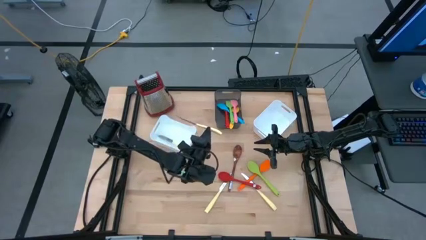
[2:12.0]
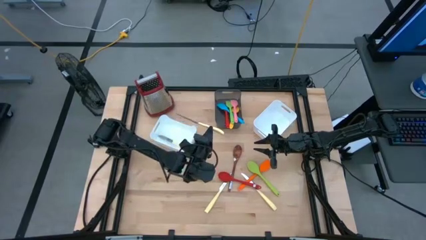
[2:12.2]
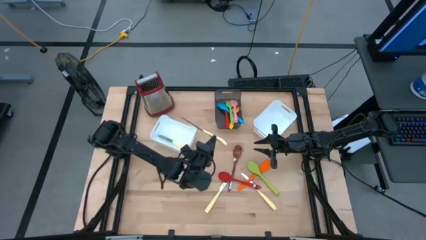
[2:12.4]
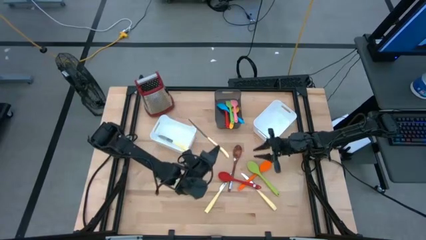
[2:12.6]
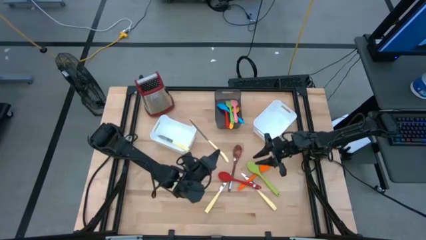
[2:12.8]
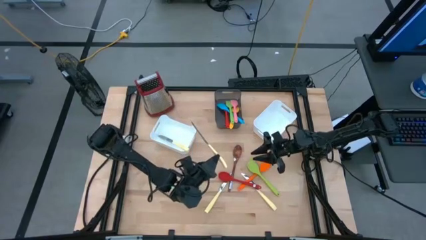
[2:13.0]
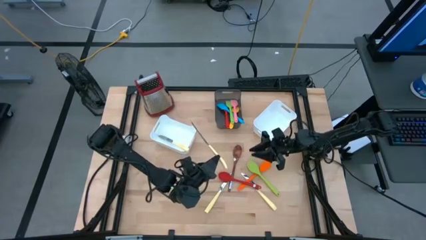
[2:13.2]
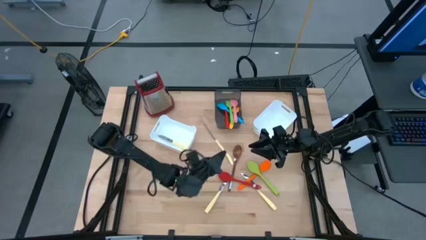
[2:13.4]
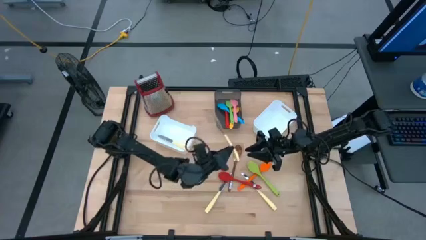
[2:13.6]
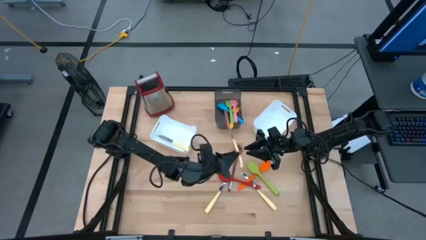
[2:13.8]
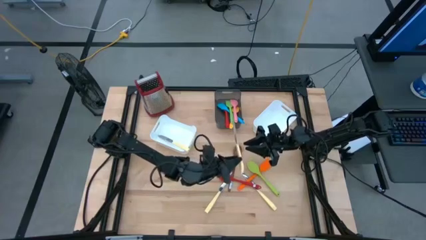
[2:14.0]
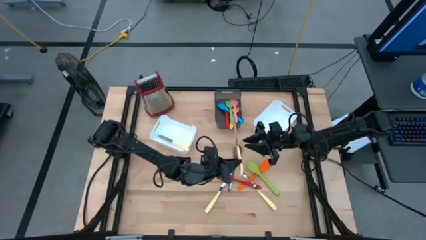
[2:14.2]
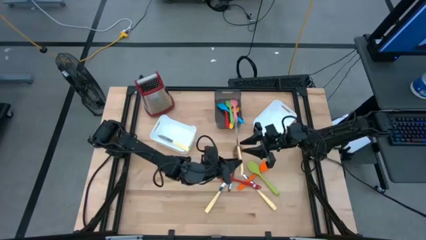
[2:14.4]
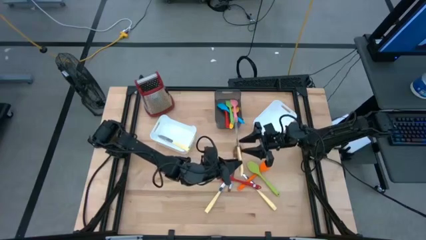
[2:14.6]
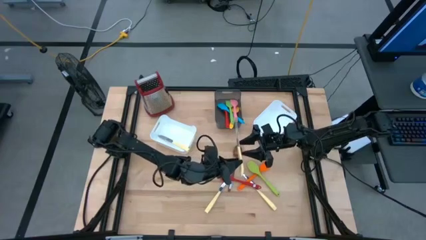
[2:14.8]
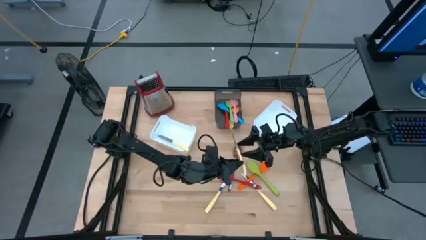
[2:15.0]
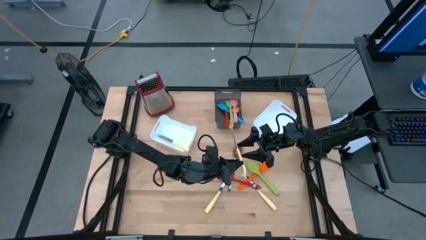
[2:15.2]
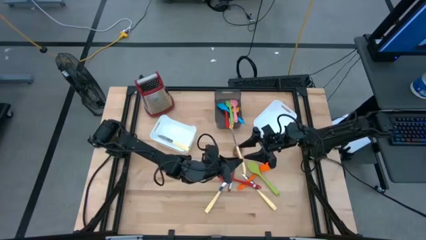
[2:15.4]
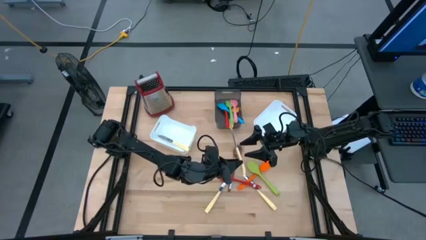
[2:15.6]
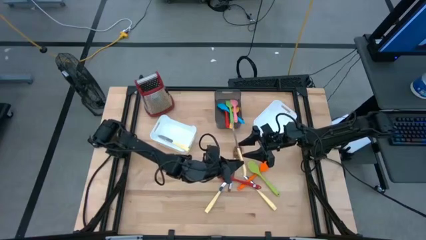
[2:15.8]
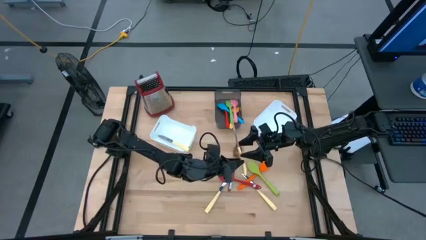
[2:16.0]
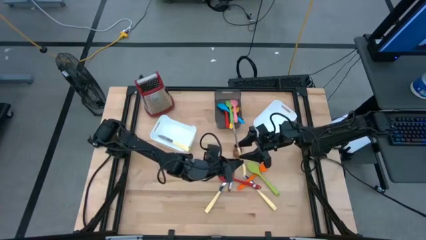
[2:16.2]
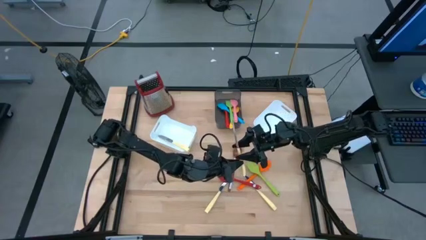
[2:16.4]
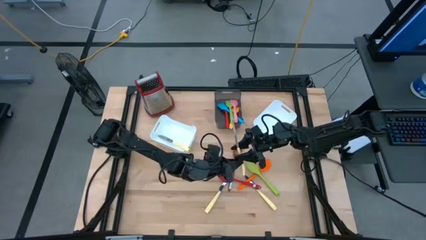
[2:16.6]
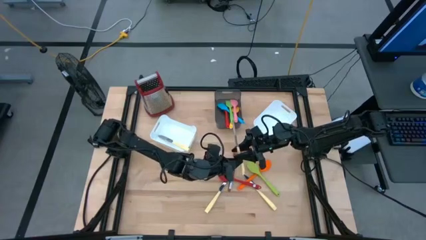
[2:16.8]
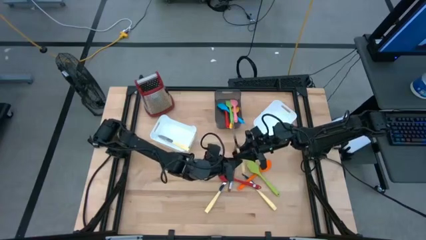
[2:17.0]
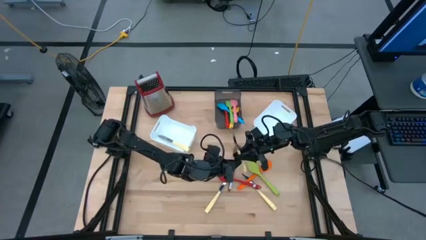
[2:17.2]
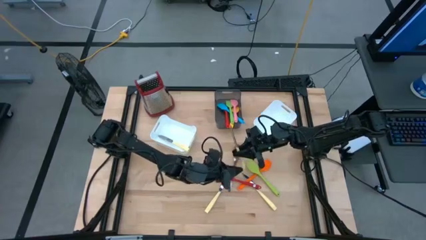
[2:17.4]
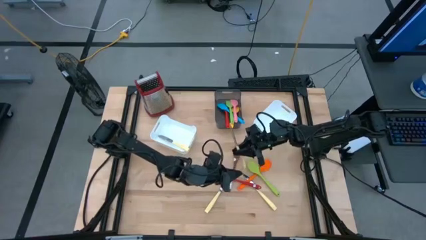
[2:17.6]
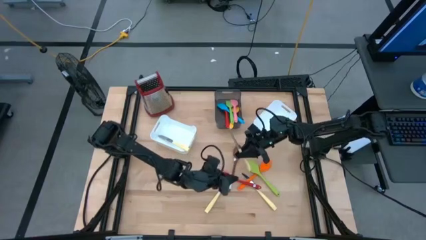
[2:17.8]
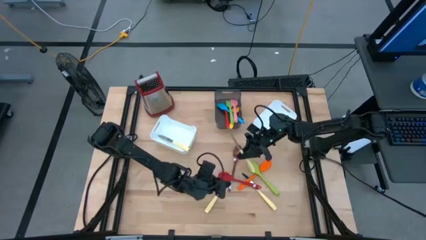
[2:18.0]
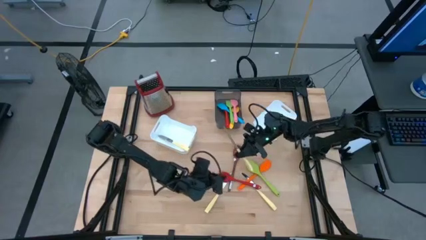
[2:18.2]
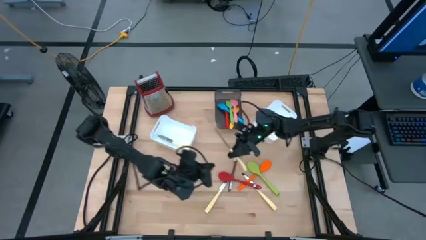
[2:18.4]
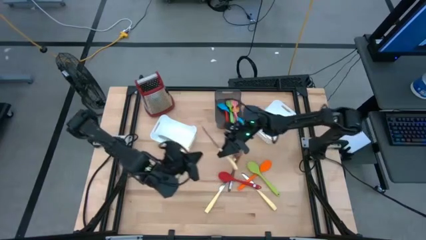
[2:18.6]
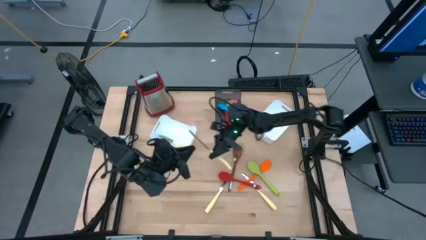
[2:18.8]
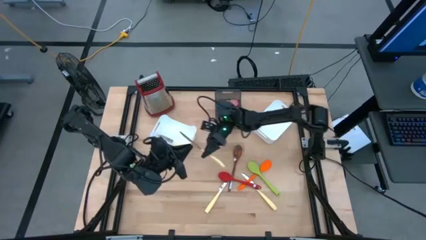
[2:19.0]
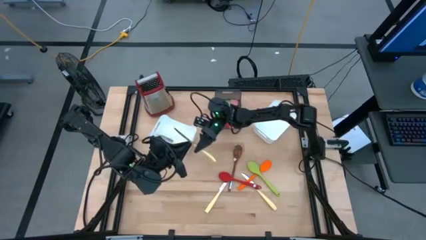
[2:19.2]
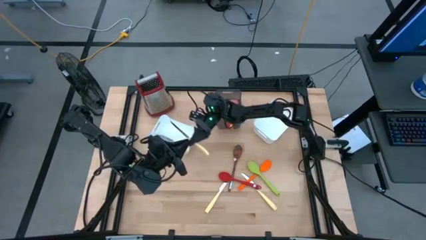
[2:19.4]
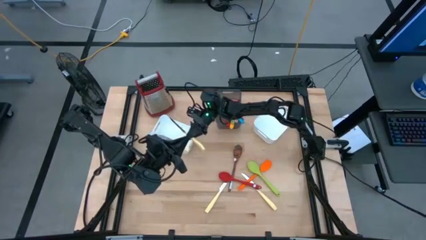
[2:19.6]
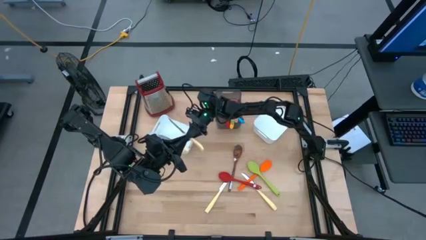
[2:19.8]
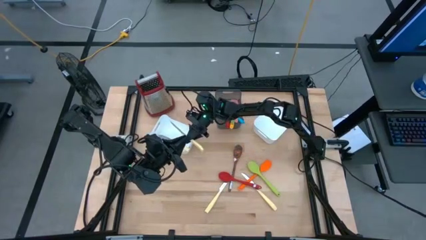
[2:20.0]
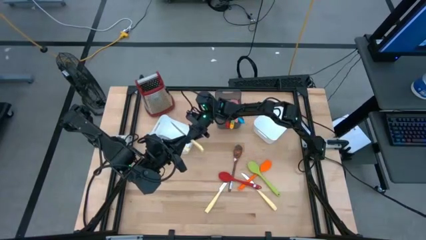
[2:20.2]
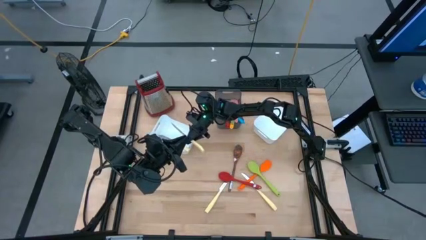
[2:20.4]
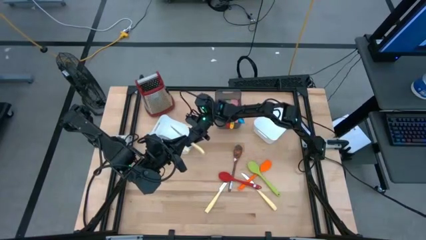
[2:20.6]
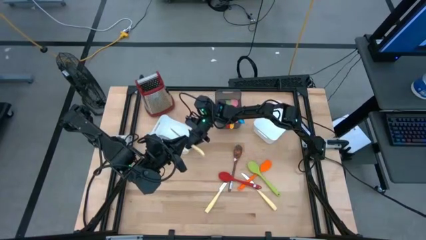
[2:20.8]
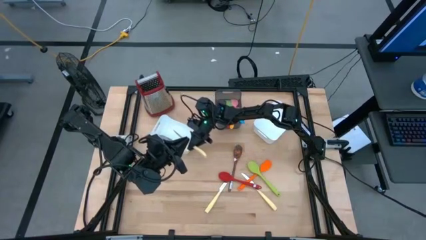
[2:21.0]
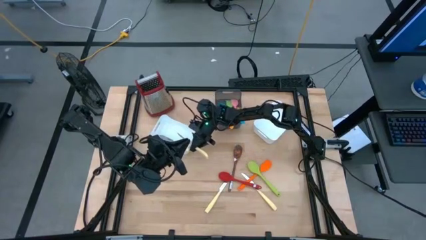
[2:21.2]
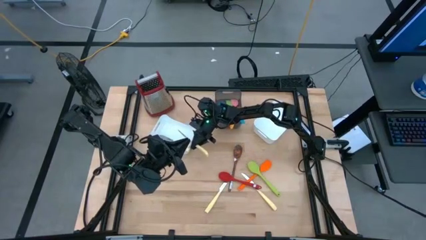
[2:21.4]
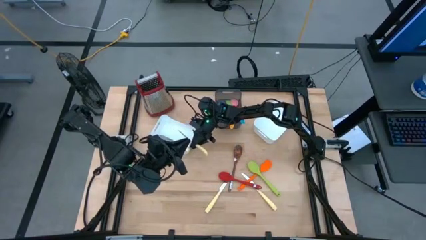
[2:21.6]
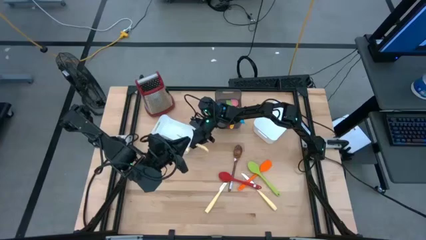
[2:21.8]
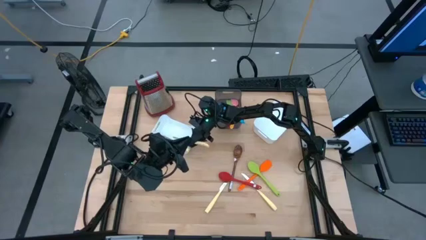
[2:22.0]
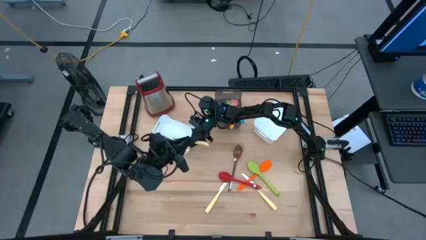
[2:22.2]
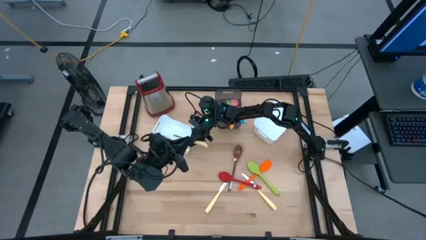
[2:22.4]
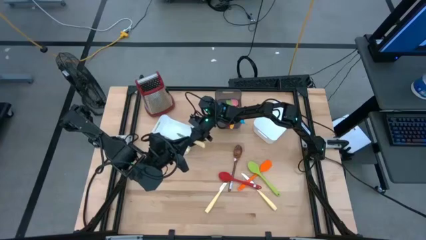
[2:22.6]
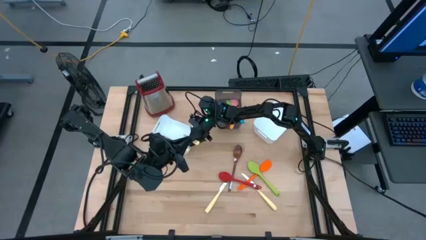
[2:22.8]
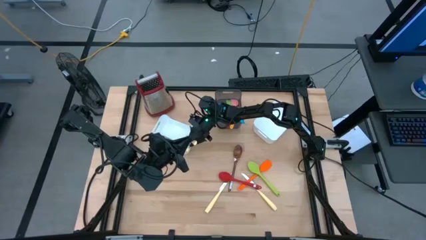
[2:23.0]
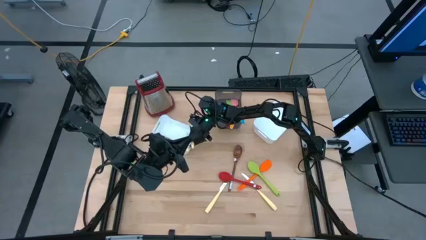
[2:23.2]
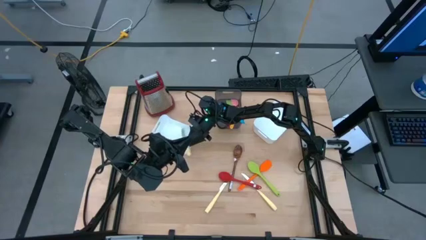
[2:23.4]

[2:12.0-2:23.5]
Task: Pick & Place Kitchen Items
Put the yellow knife into the left white bin
